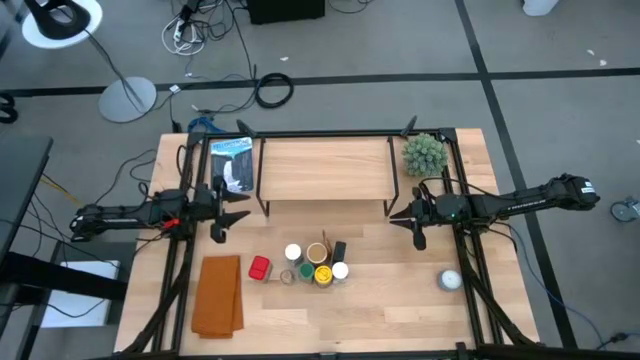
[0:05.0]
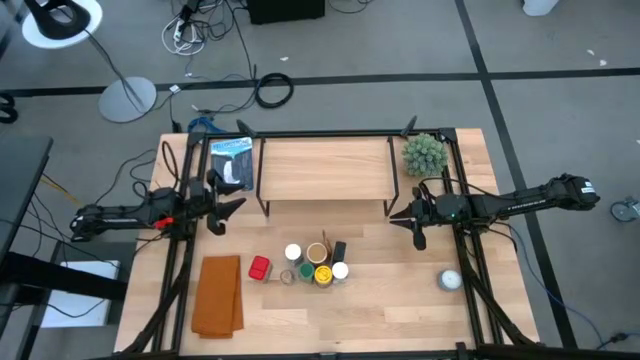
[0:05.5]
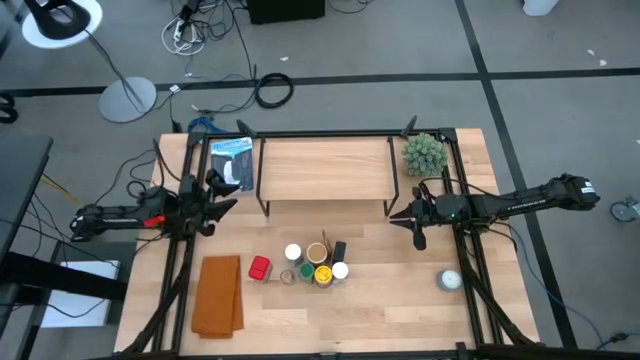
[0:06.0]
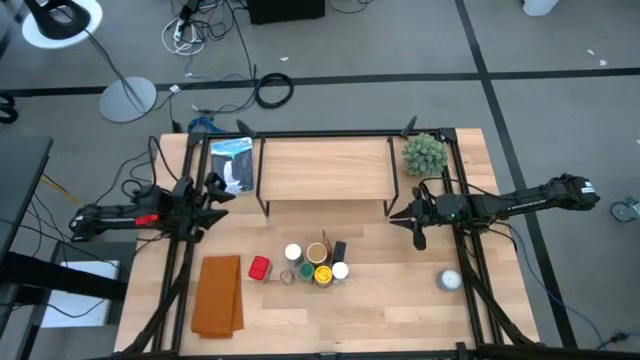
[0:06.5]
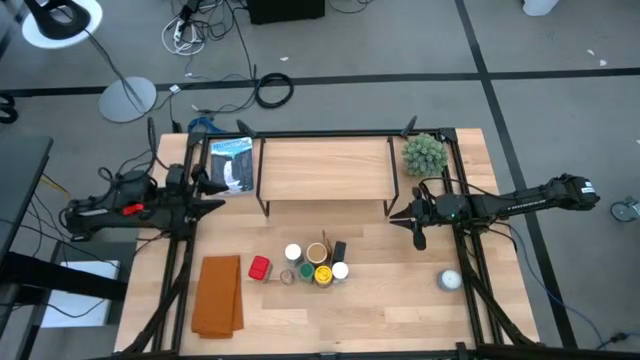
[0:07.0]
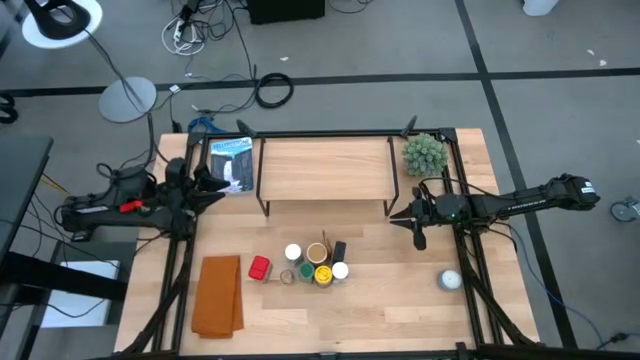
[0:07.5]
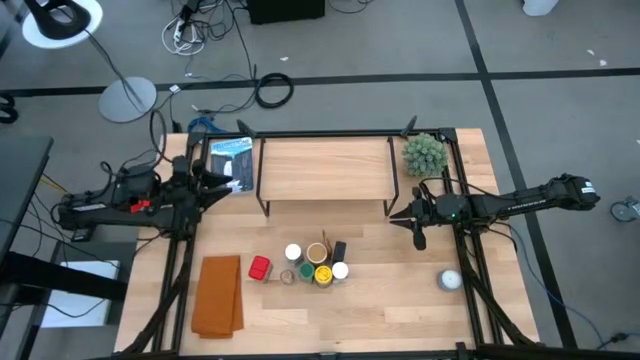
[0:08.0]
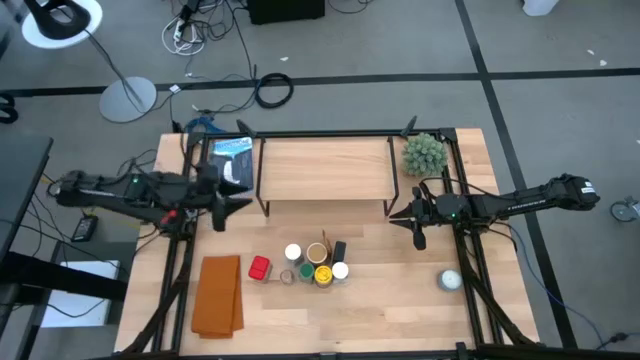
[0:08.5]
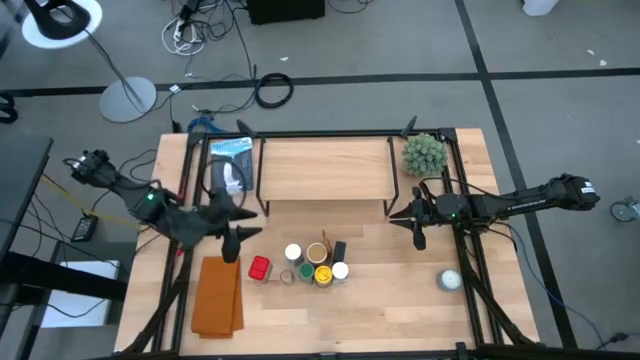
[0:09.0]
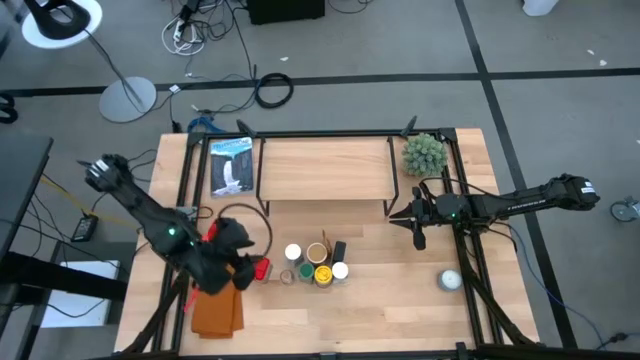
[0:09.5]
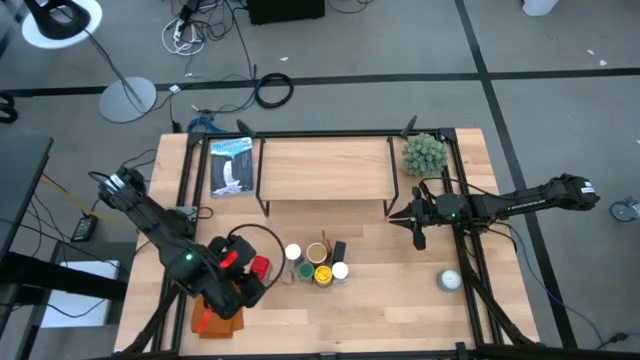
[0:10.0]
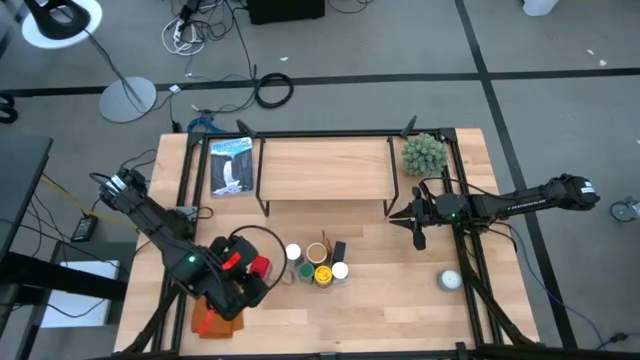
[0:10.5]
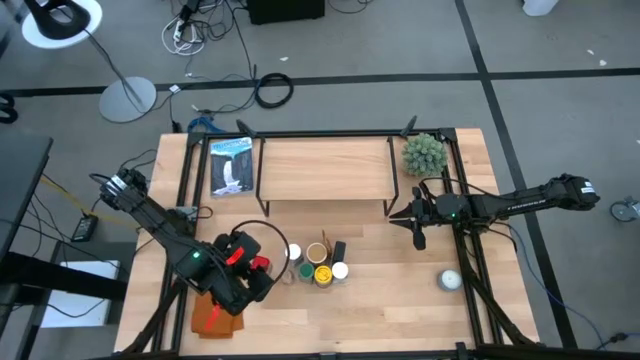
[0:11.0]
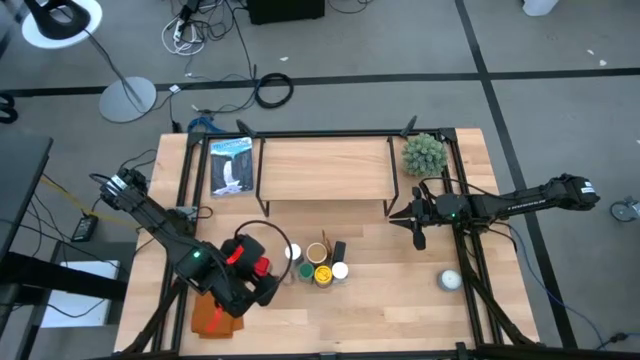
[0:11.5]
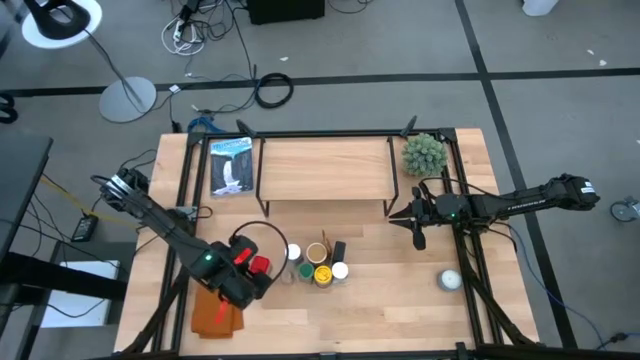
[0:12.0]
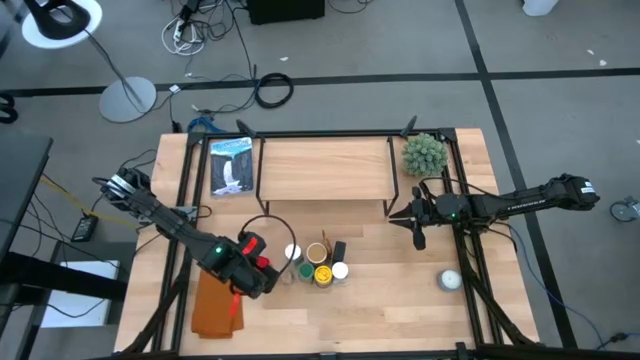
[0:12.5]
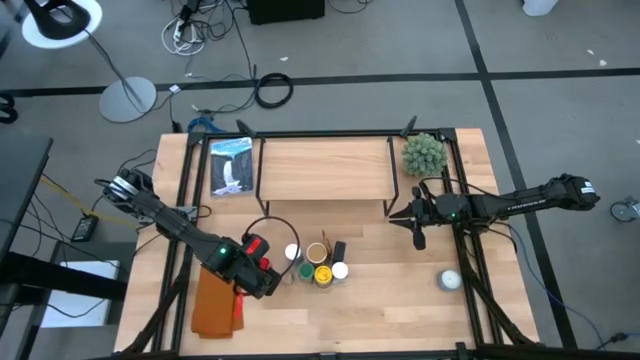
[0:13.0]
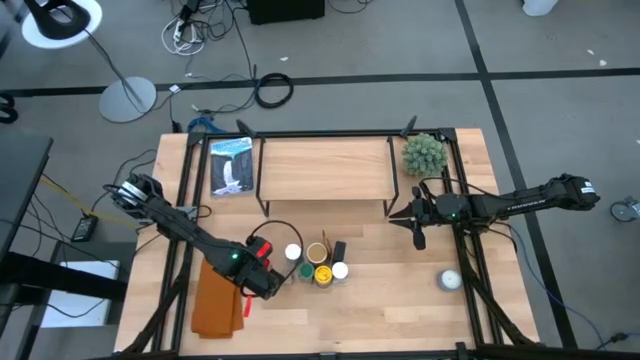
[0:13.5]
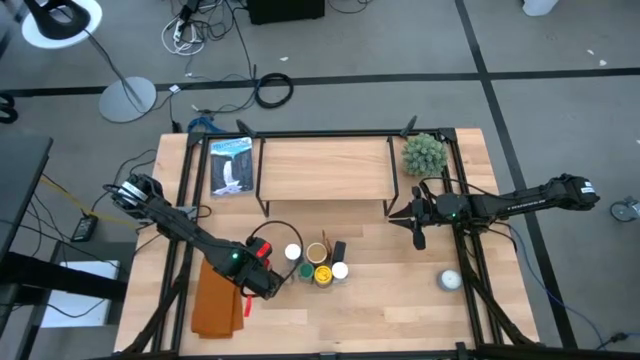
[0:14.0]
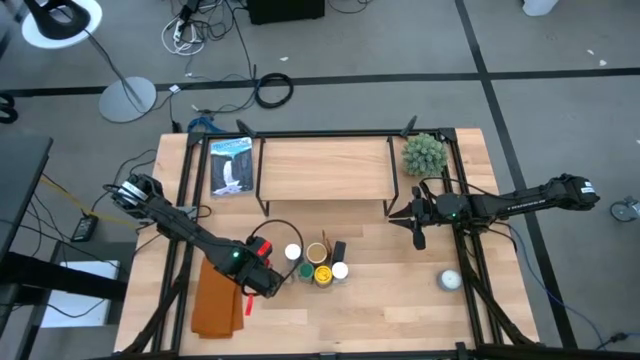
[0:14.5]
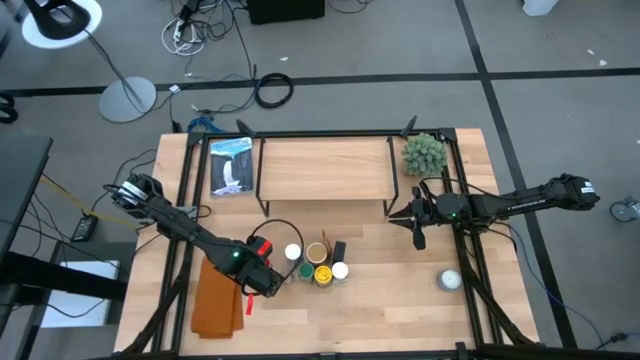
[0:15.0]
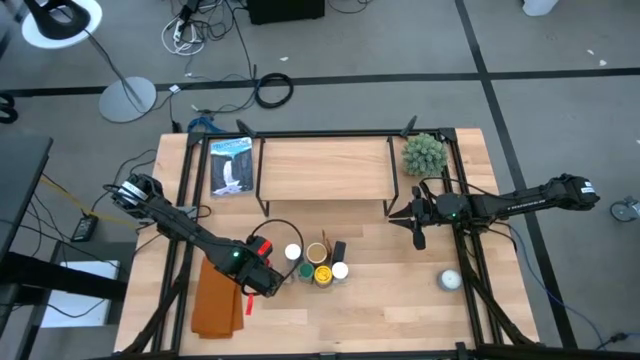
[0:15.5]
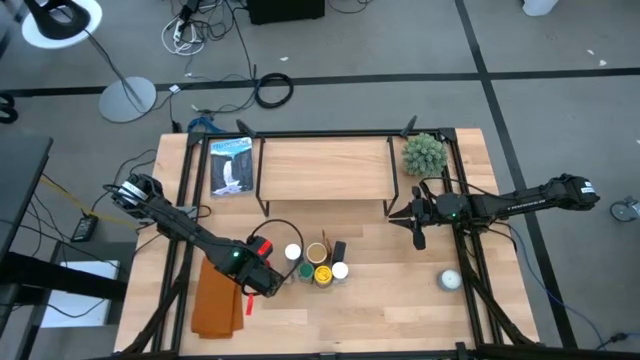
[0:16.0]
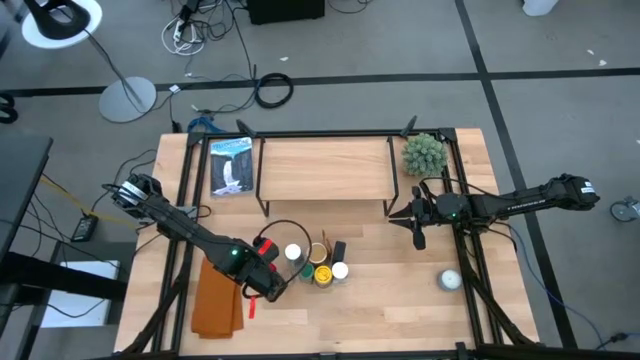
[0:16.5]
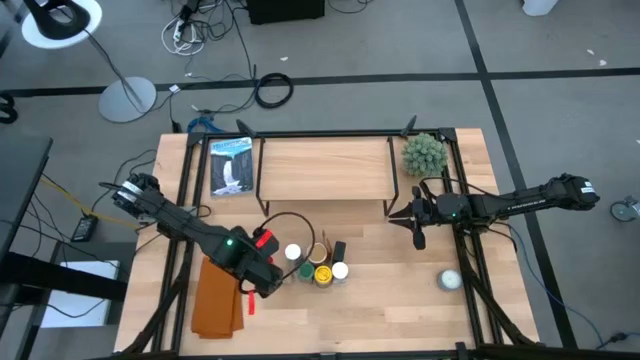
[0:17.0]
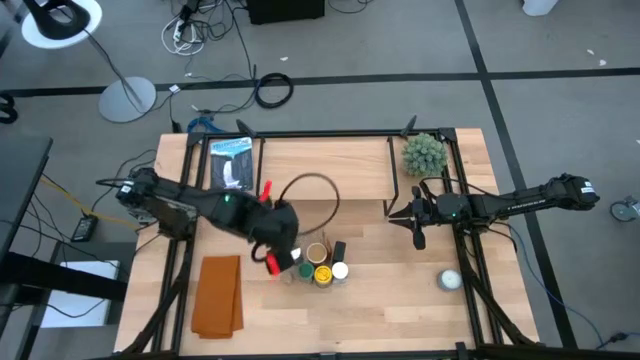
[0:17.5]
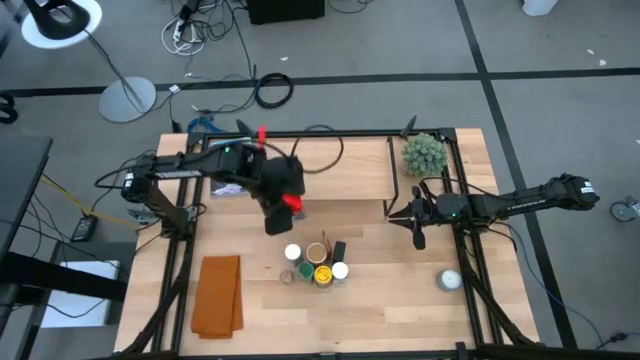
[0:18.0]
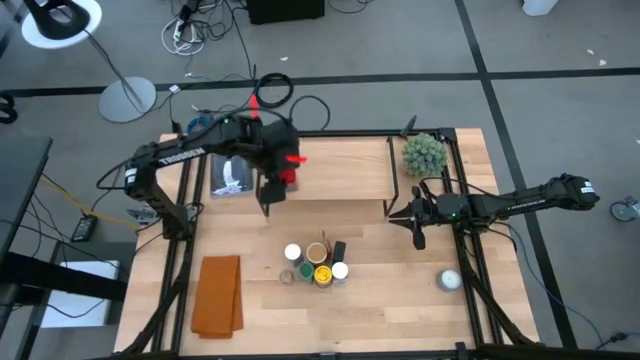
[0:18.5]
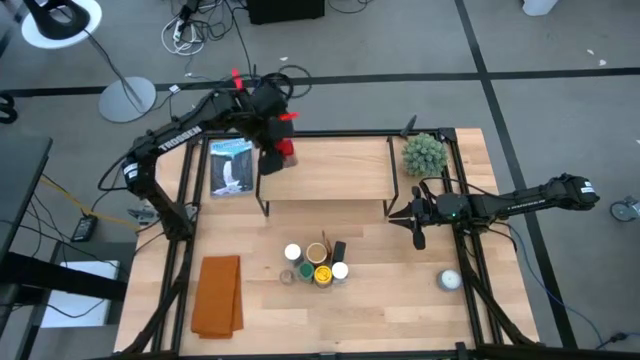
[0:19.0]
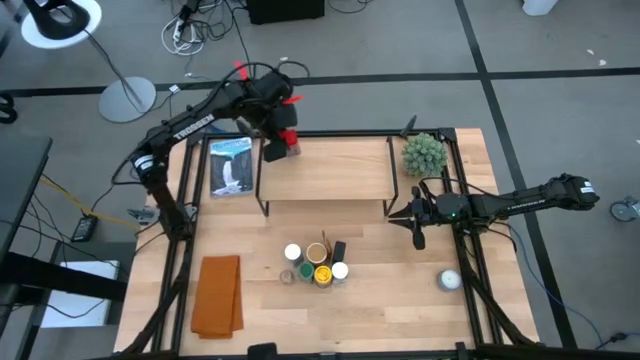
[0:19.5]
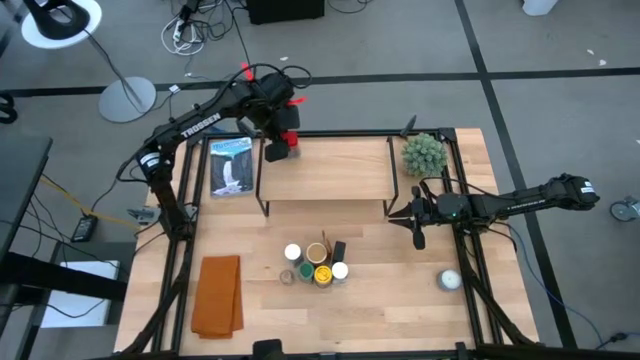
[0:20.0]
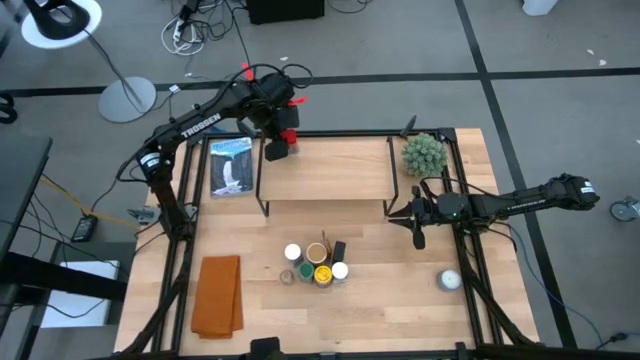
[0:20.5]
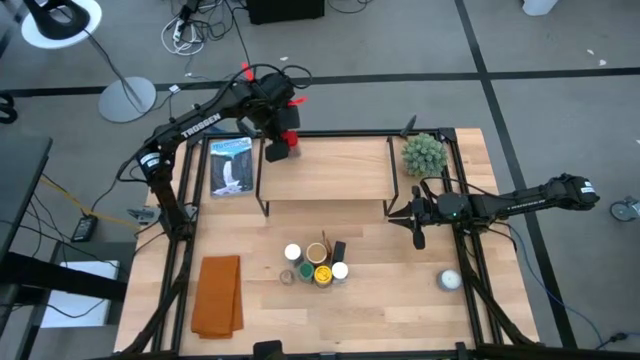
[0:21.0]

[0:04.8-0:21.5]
Task: Shelf spices
Put the red seasoning can on the shelf

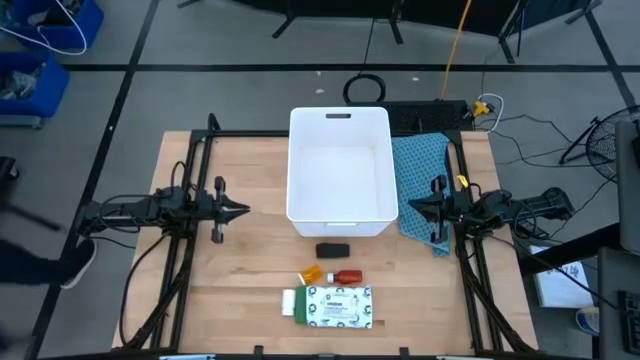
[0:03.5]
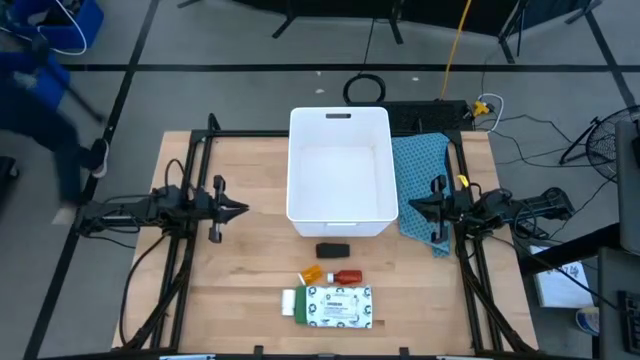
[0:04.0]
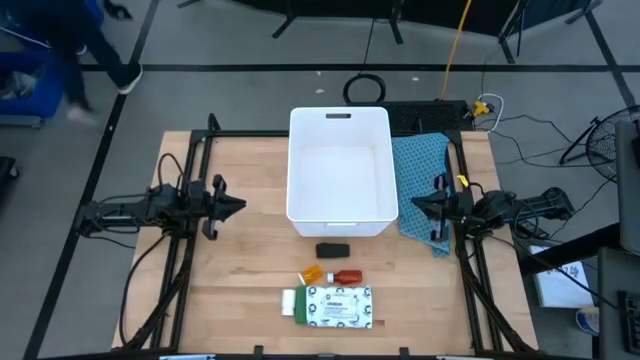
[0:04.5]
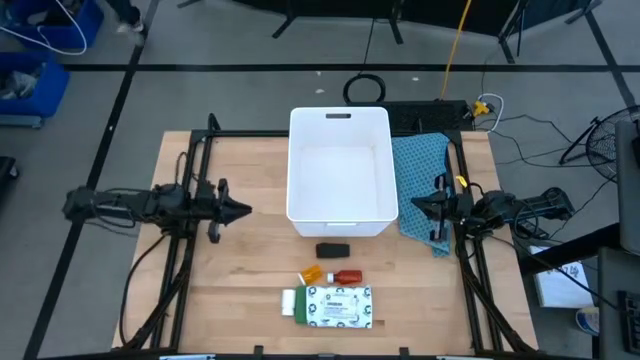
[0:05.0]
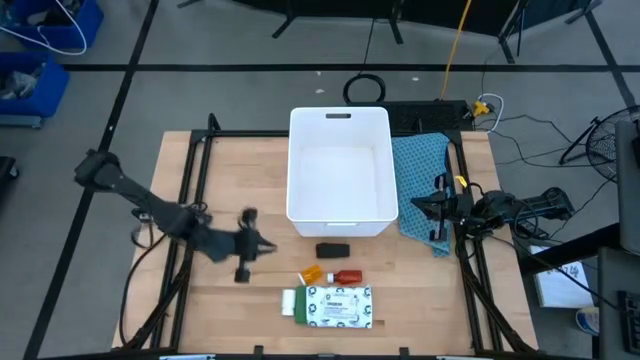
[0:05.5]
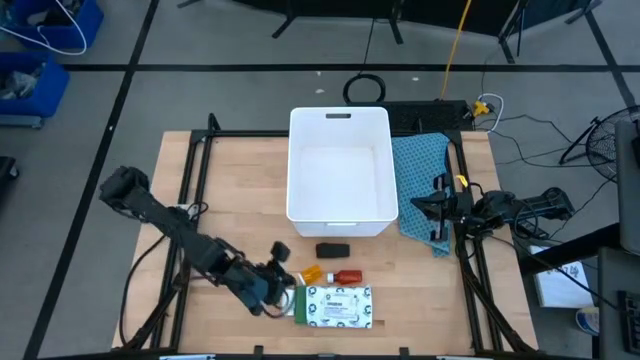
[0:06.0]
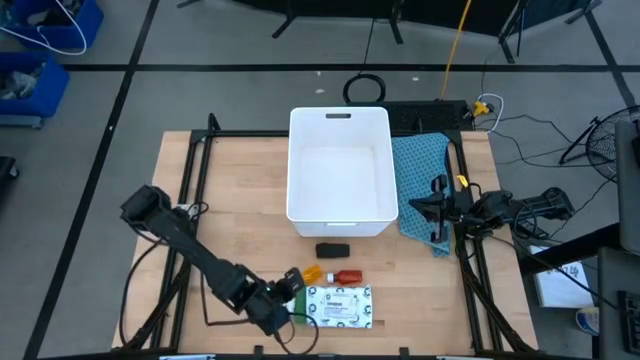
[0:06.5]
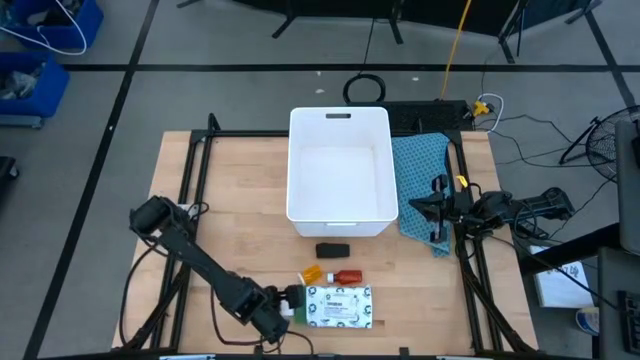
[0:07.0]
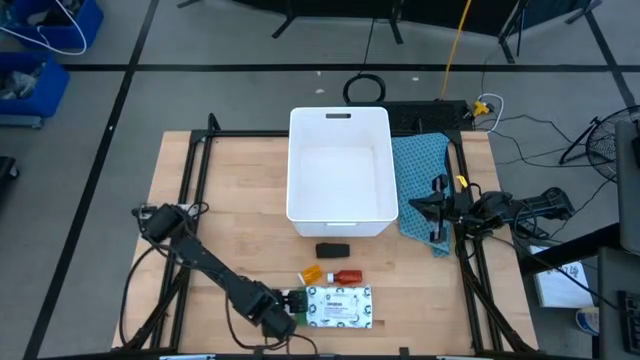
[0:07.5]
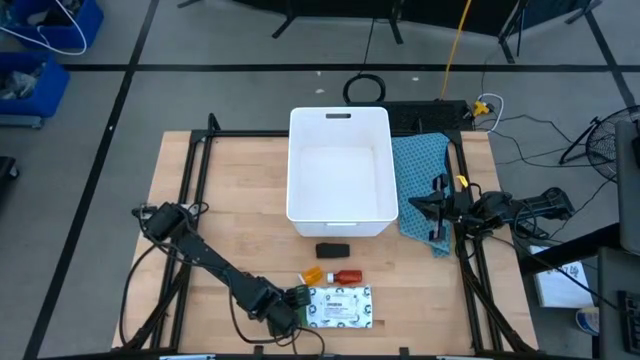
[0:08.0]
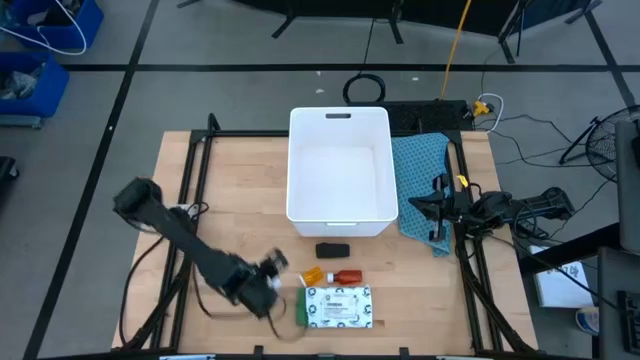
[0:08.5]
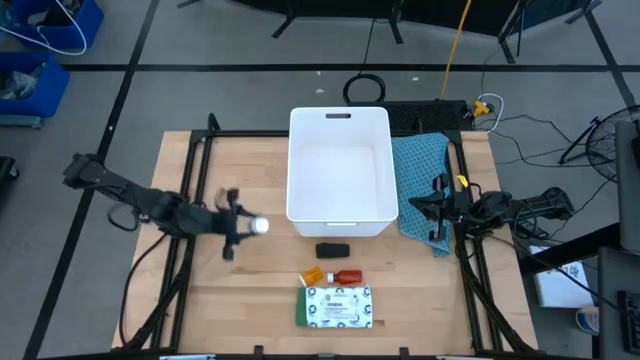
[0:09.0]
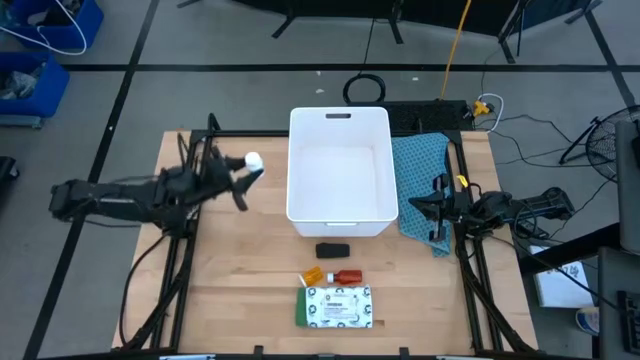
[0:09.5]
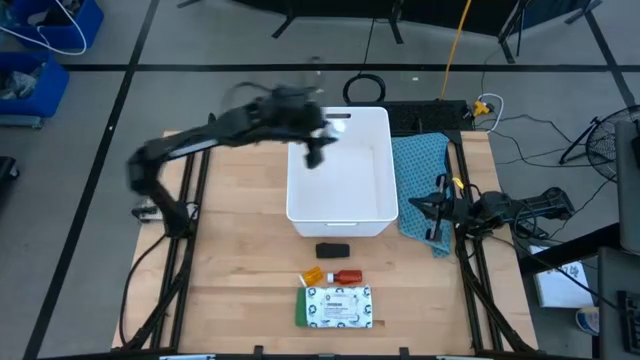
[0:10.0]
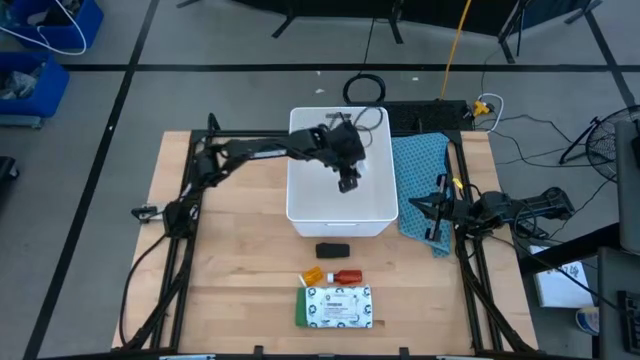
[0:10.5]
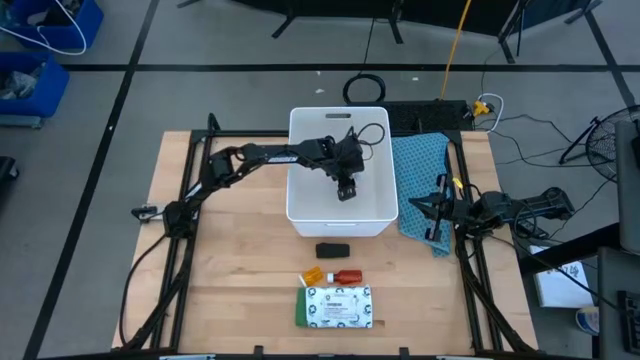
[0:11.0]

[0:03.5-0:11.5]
Task: Pick & place medical supplies in basket/bin
Put the white medicine bottle into the white bin
